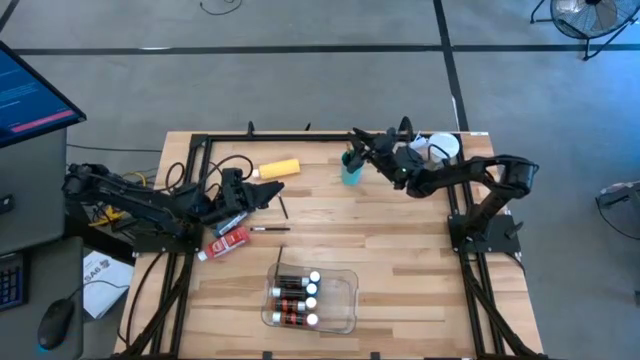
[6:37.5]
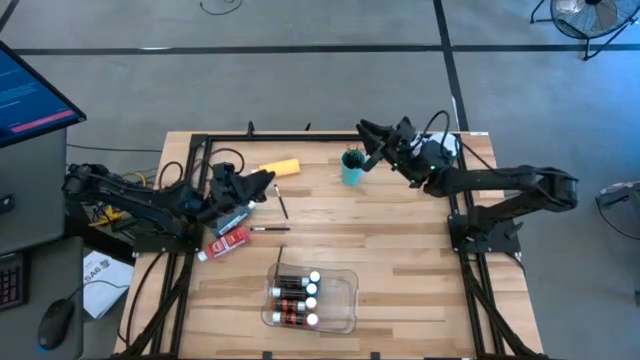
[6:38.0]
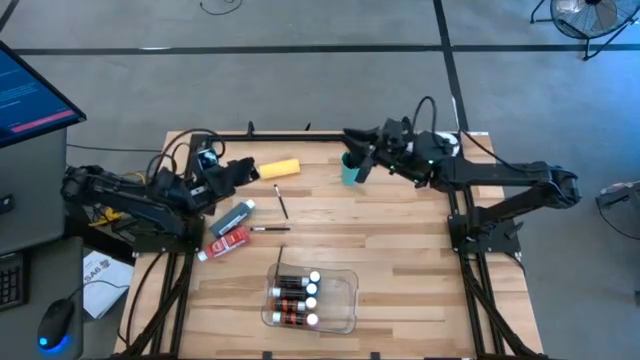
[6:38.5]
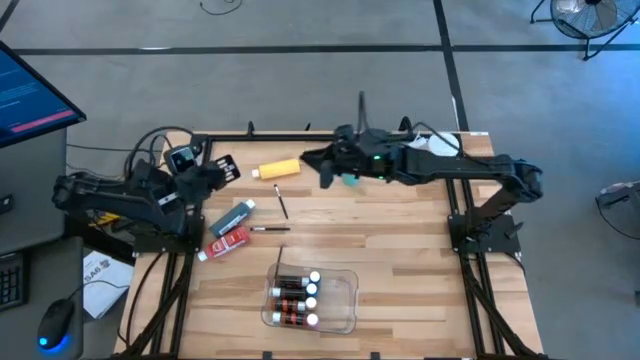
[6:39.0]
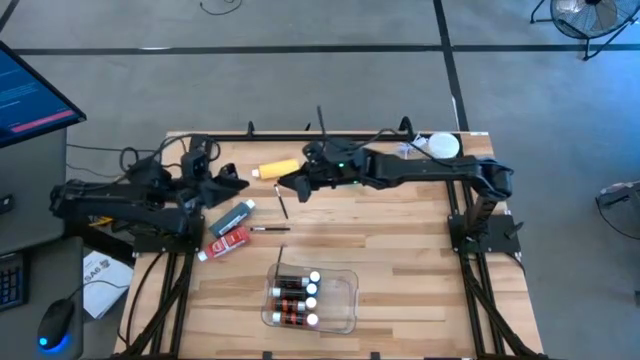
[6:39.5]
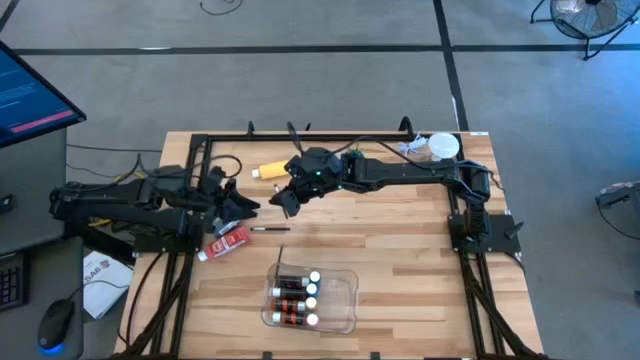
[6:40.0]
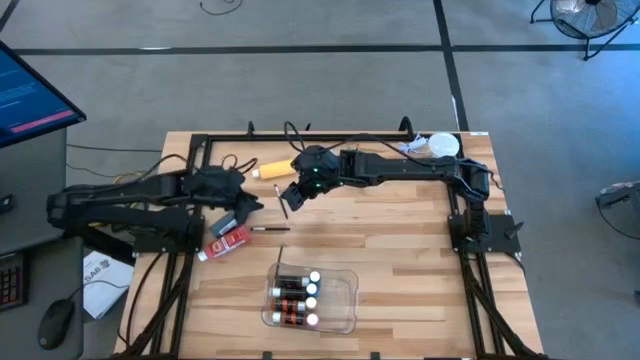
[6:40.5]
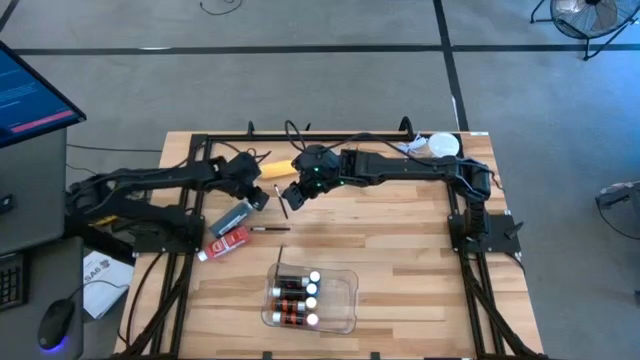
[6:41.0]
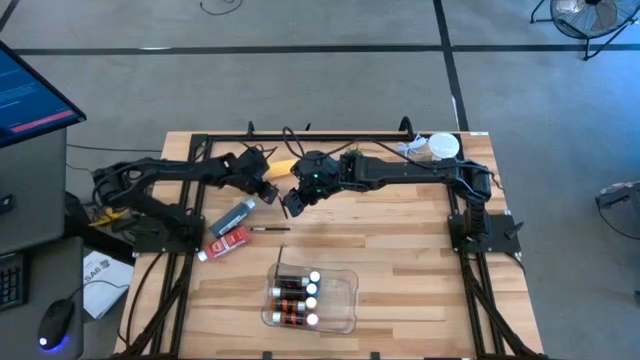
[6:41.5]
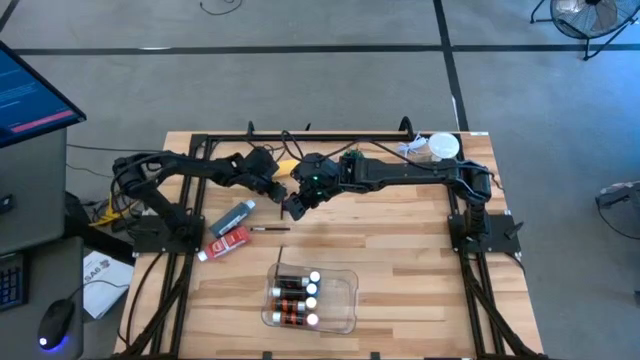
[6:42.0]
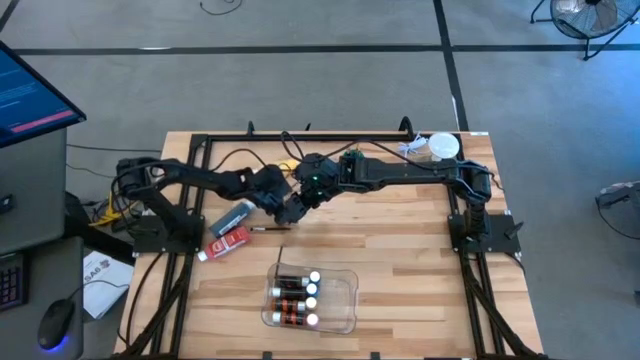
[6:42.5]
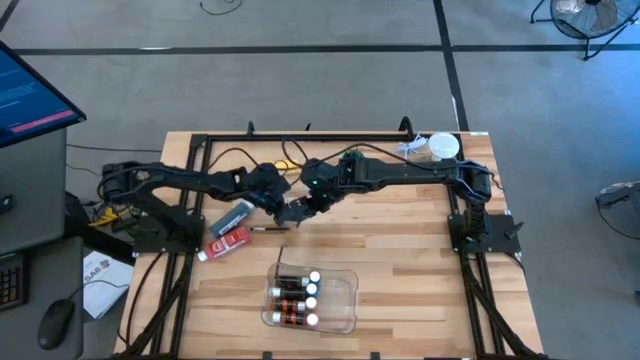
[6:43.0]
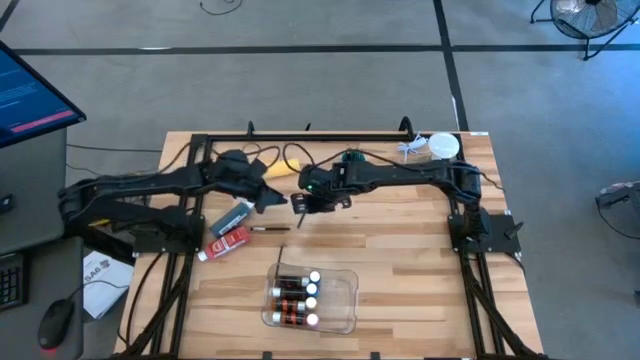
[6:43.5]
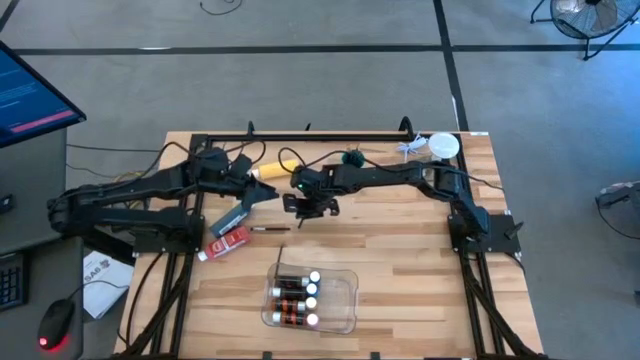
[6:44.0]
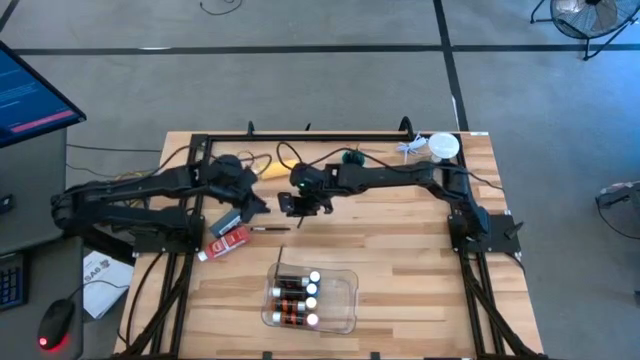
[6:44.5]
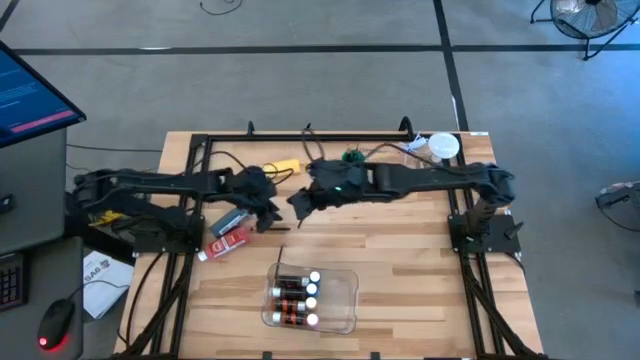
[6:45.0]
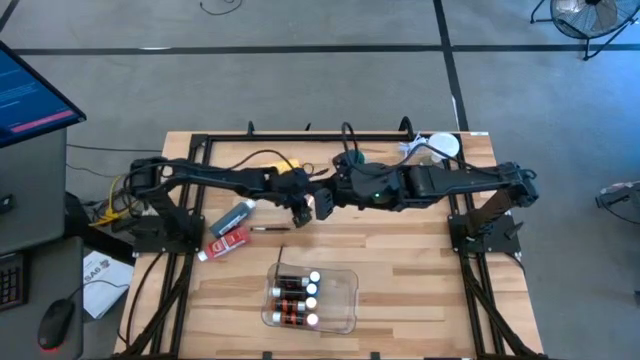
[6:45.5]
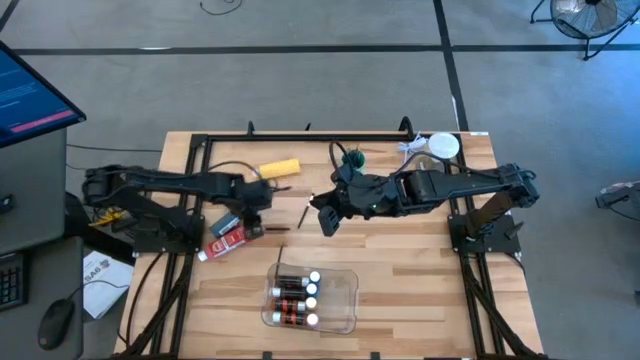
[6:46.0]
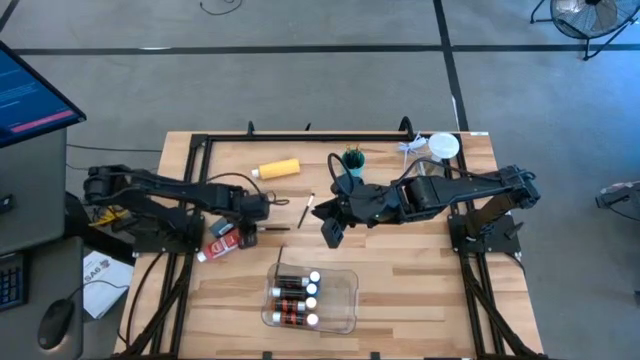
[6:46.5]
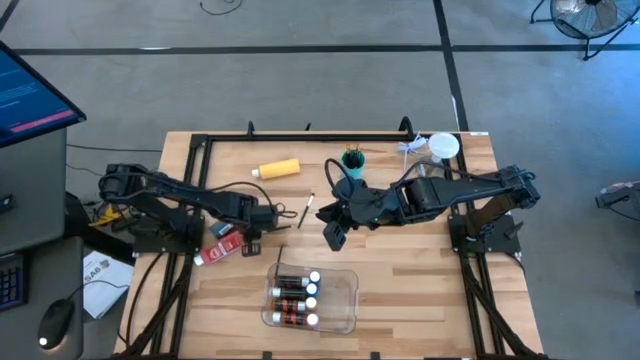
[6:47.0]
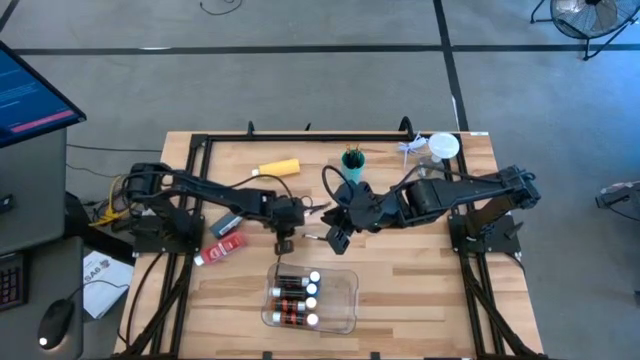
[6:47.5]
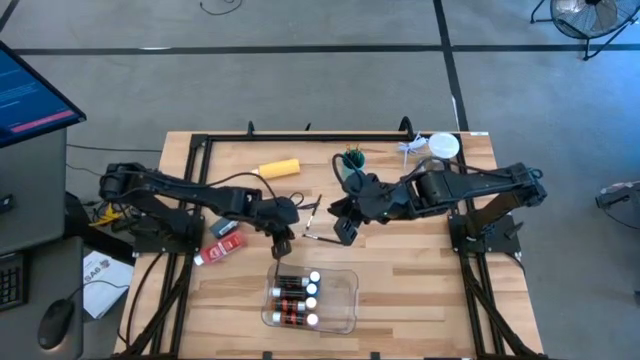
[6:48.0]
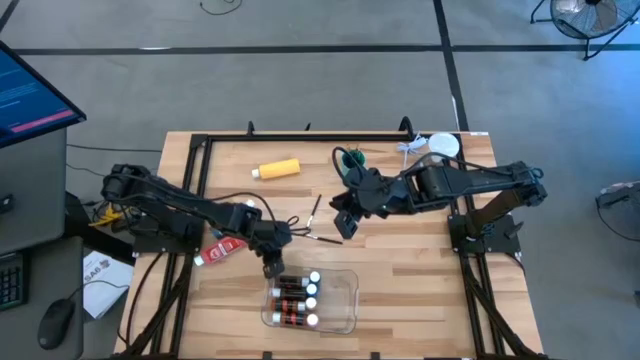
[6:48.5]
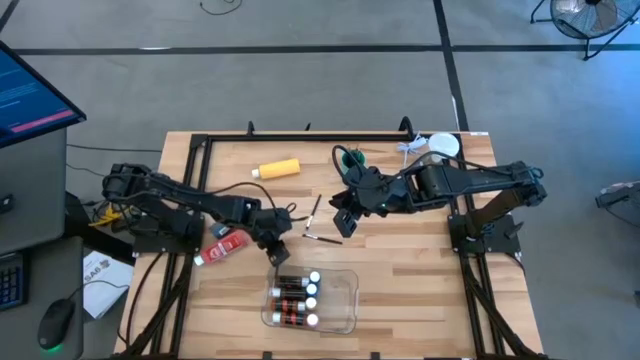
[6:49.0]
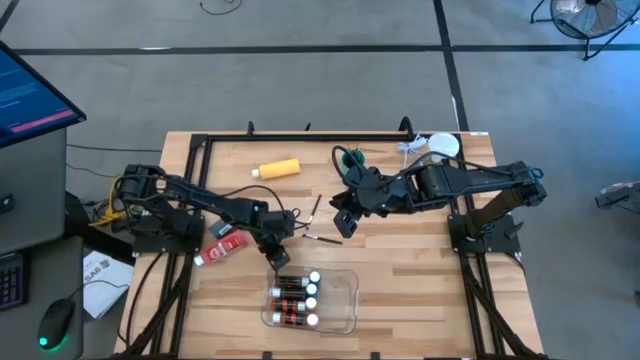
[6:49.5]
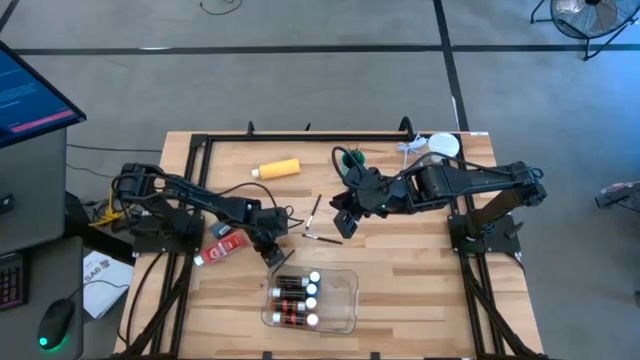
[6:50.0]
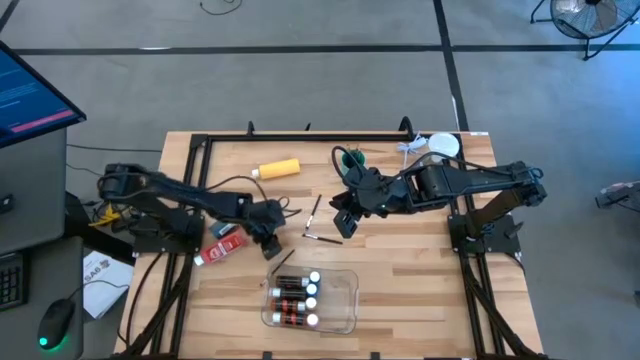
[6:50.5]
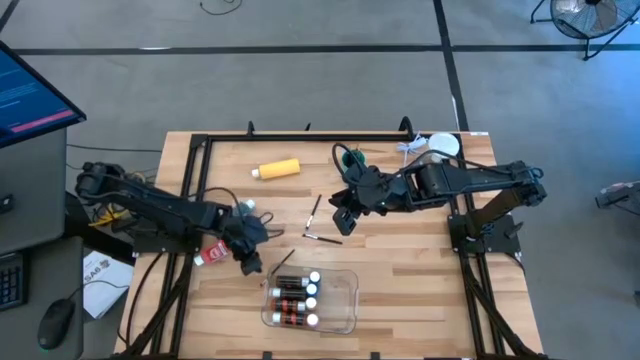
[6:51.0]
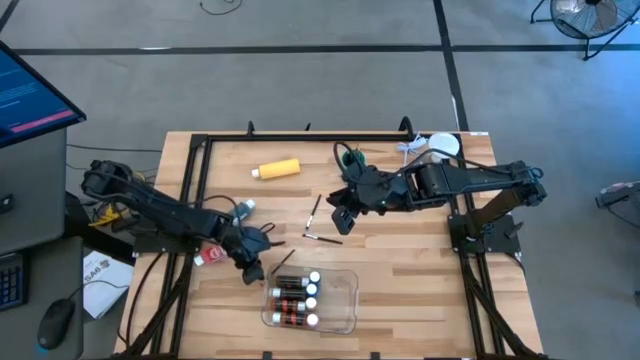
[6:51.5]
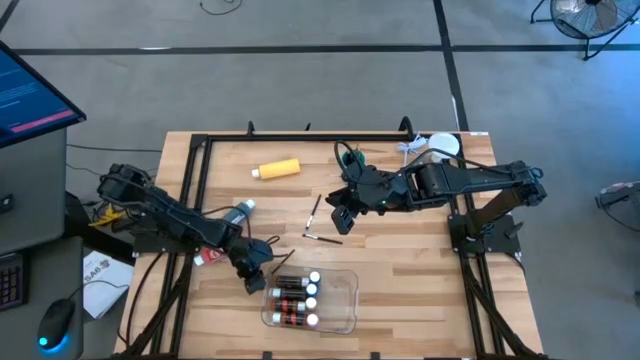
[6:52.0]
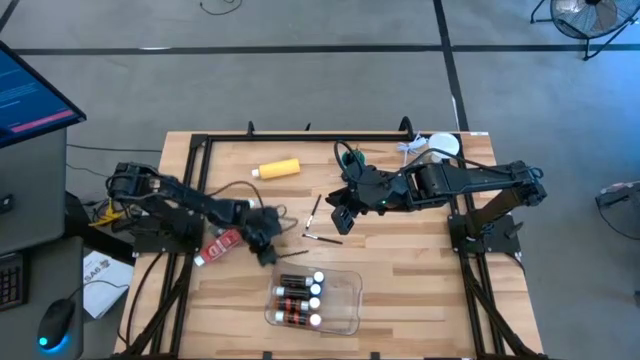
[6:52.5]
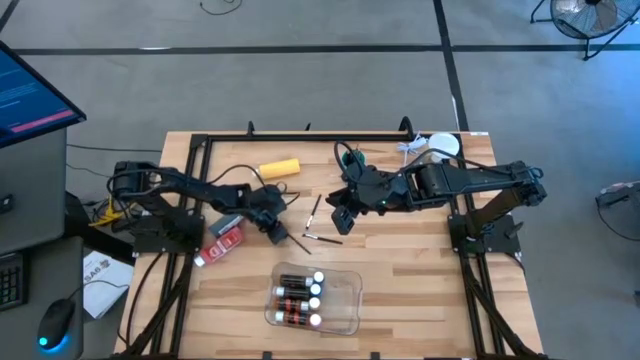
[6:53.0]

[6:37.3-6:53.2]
Task: Pick & Place Paint Supplies
Adjust the paint brushes on the table

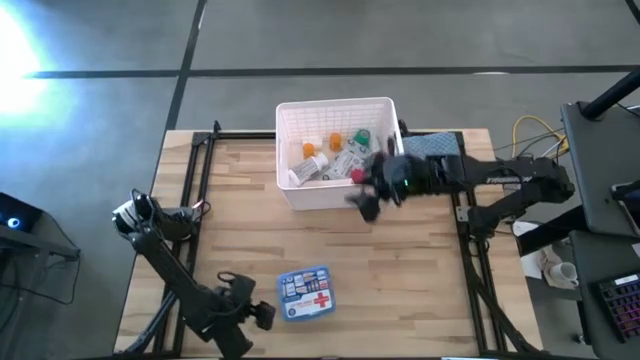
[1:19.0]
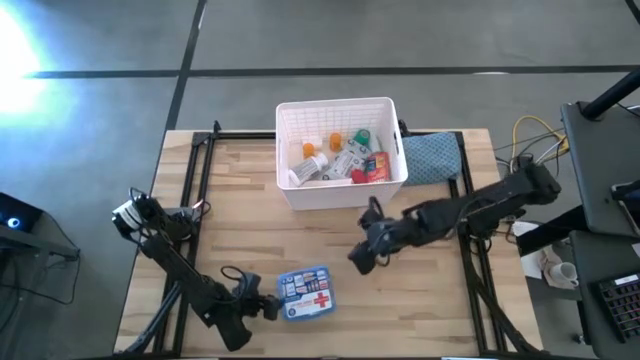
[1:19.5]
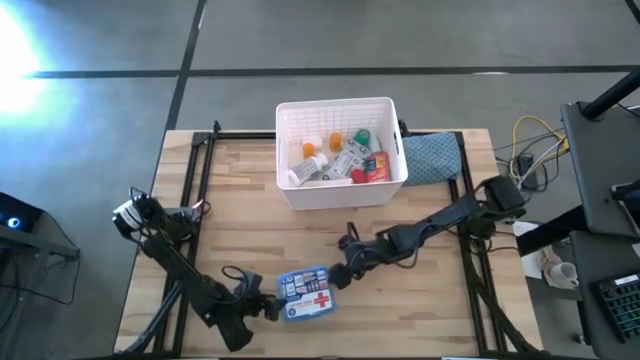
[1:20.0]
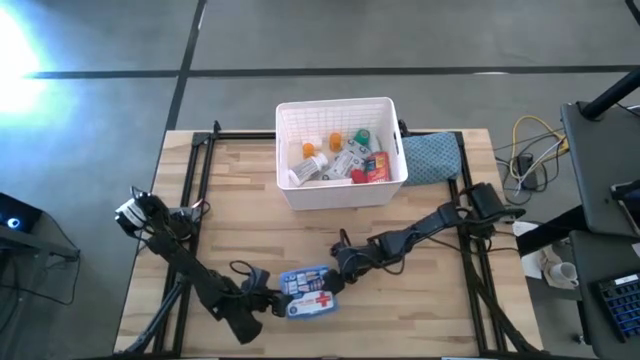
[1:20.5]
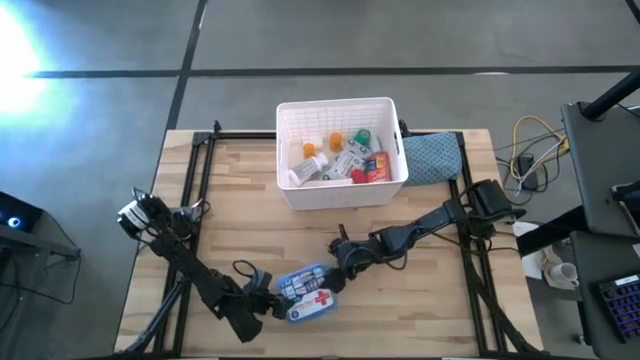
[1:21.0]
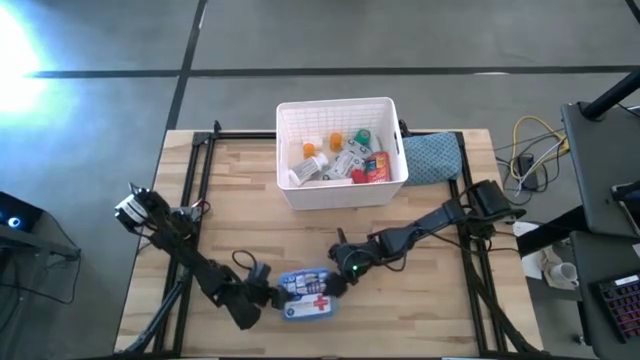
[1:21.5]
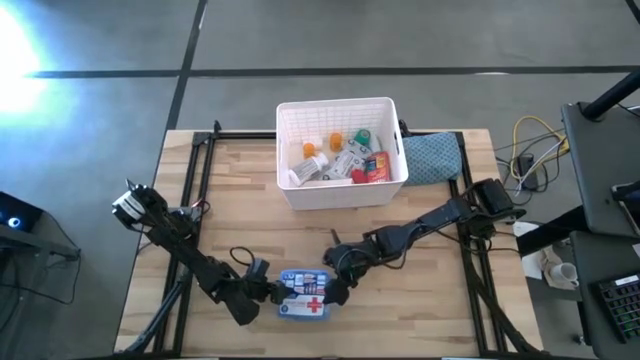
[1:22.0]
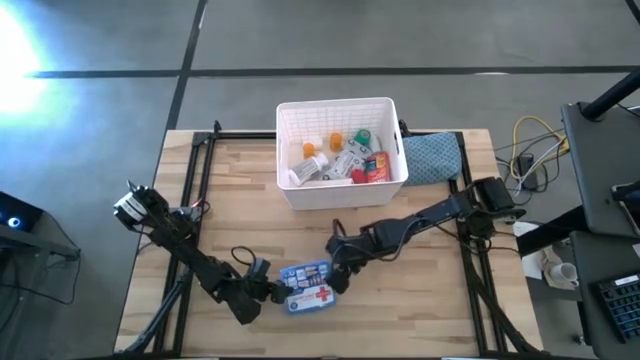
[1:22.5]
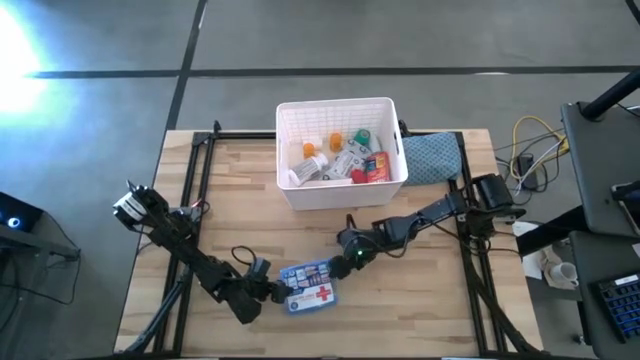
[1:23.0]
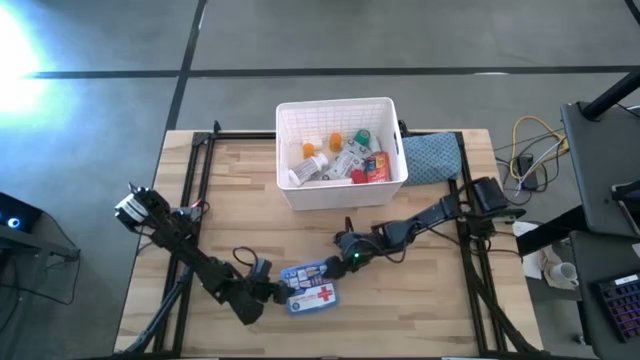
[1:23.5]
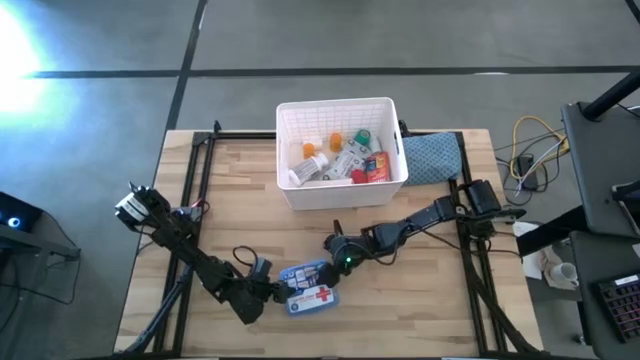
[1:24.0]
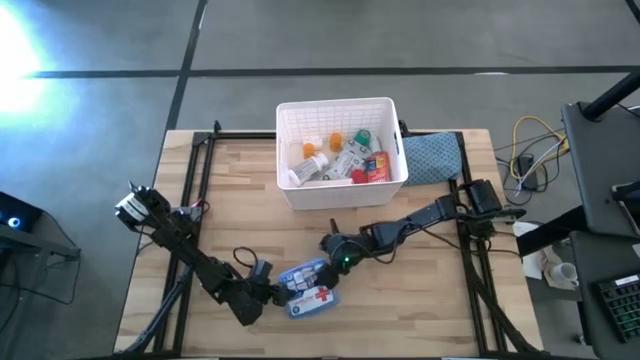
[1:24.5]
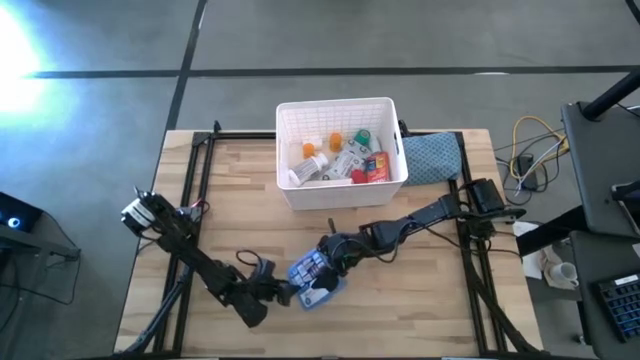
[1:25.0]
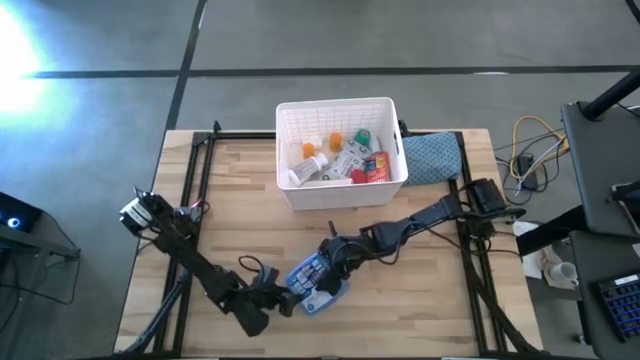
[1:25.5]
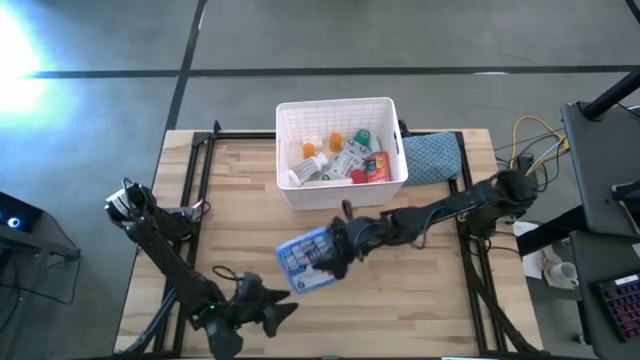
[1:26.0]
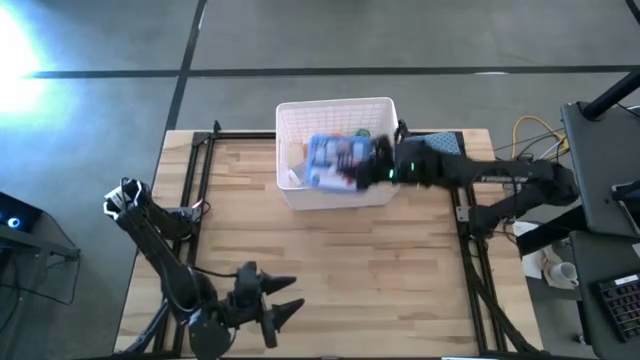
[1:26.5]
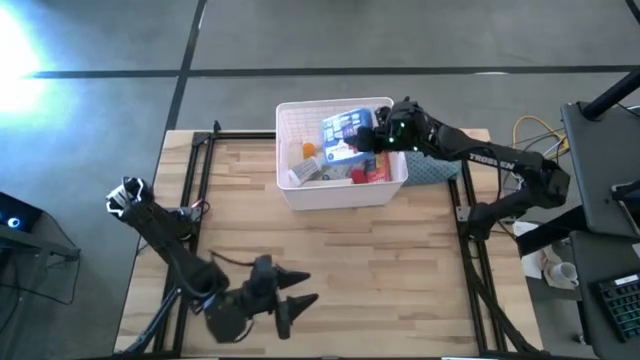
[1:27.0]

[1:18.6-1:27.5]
Task: Pick & place medical supplies in basket/bin
Put the blue first aid kit box into the white container
